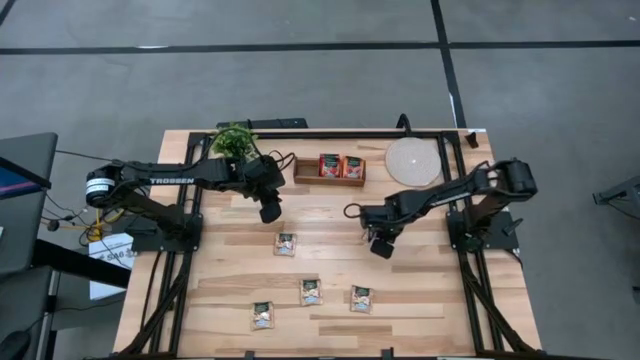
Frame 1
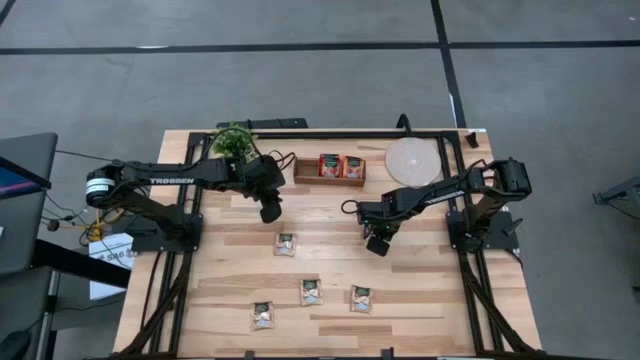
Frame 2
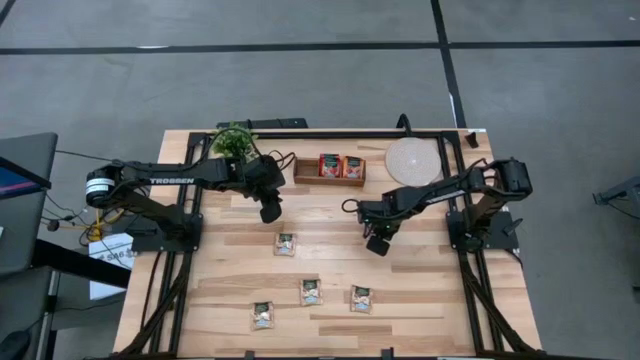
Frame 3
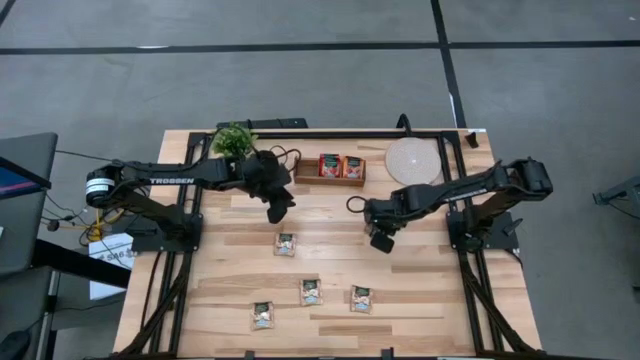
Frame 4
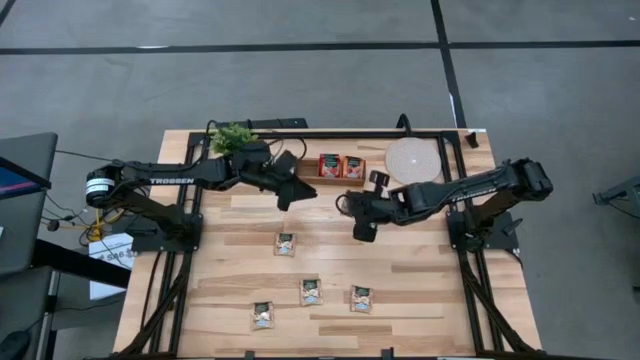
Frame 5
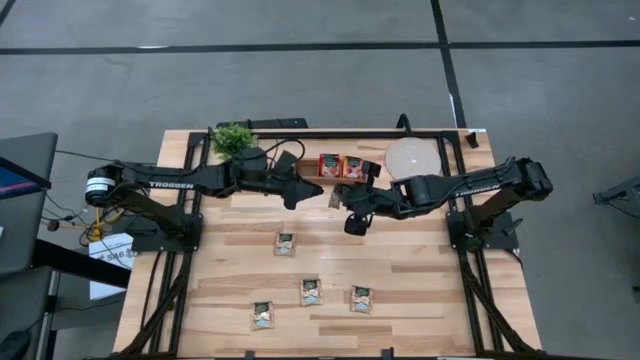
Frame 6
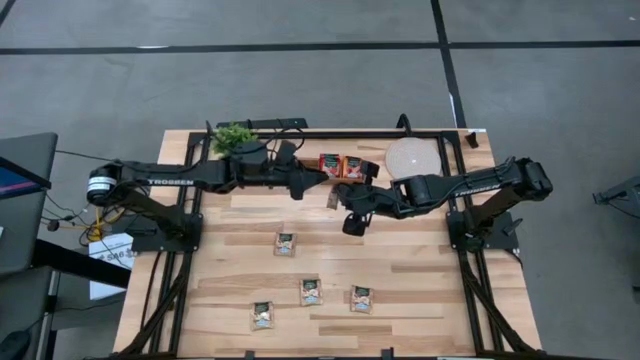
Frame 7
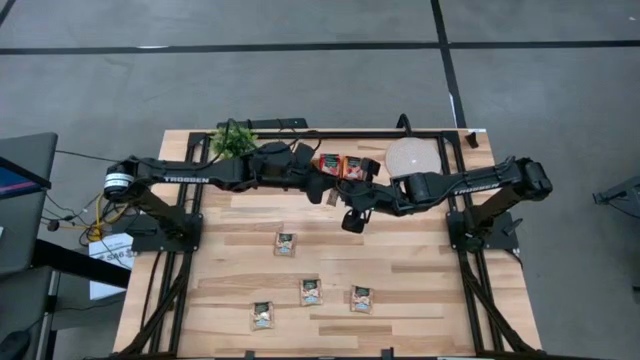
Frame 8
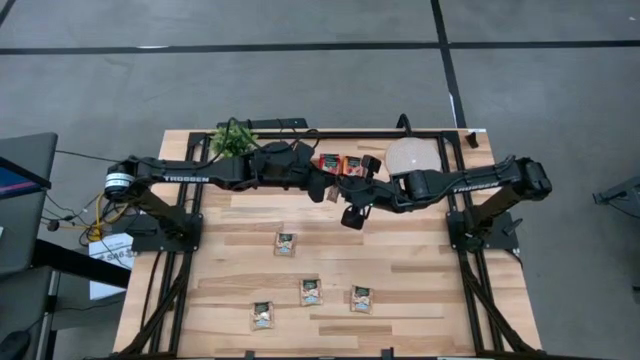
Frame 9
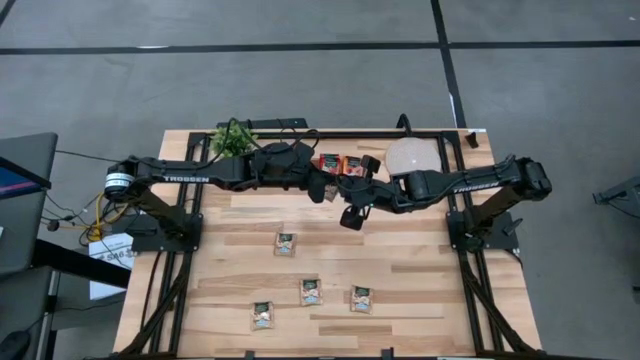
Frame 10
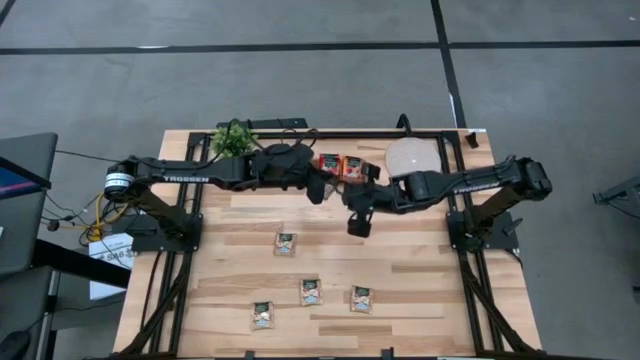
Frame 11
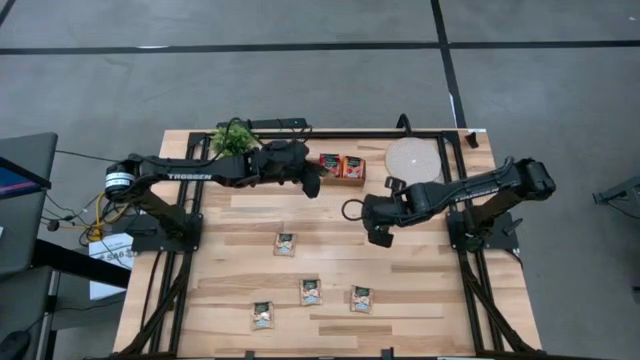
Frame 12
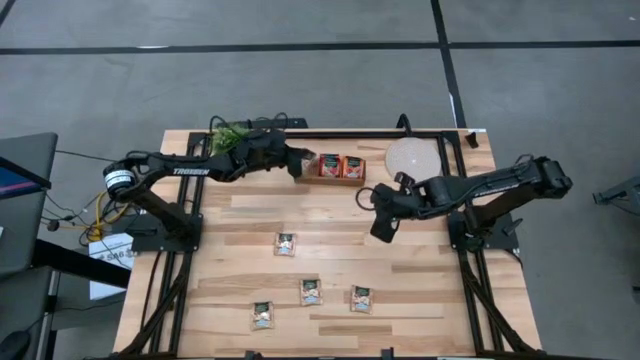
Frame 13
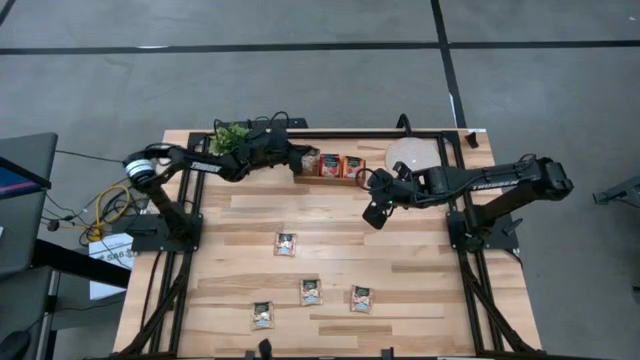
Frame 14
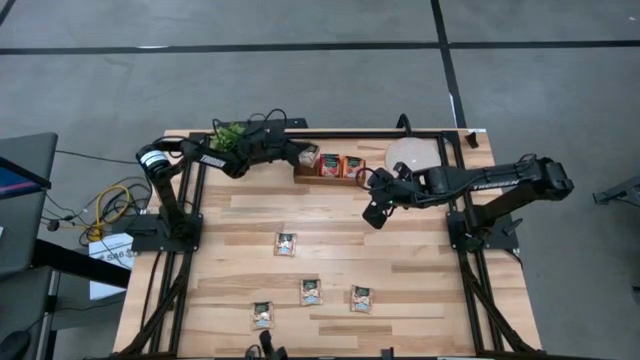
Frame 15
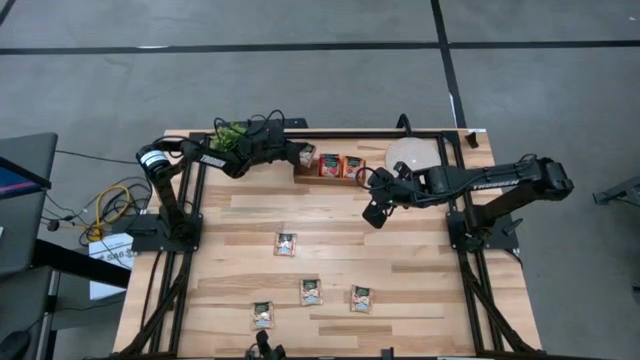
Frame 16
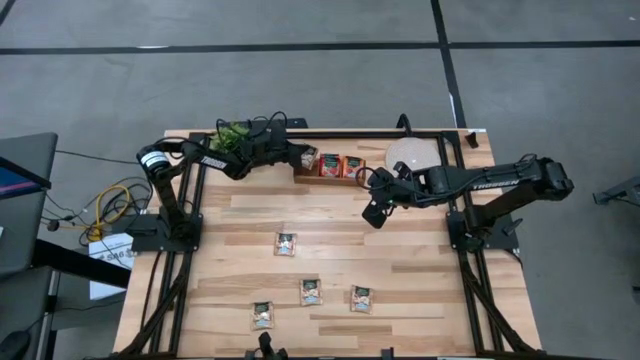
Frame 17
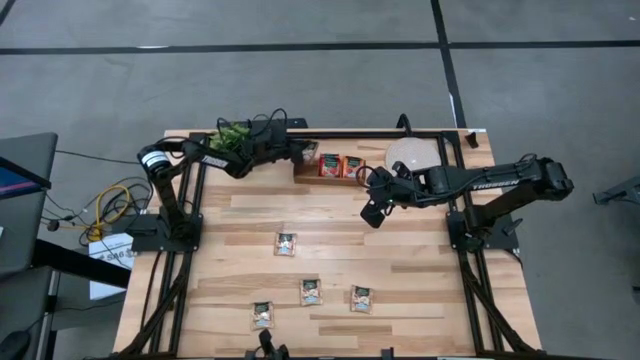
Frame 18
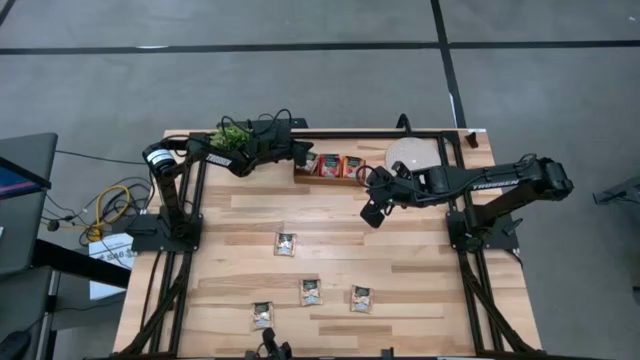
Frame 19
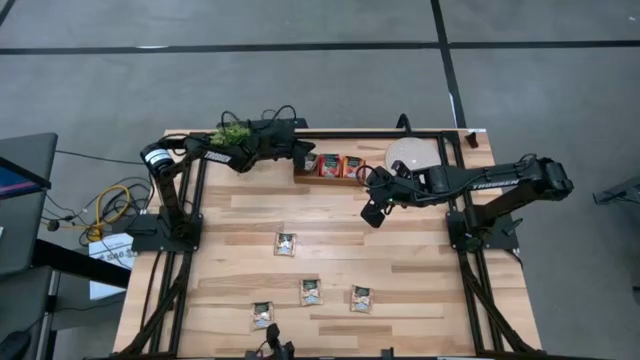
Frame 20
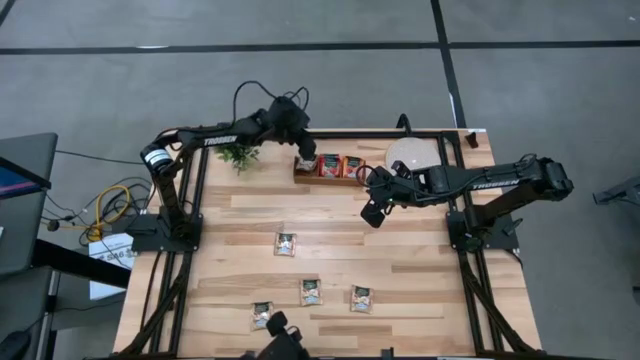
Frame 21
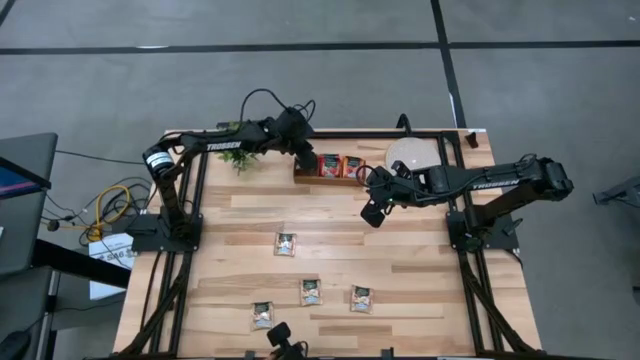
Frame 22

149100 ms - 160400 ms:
Task: Pick & Place Tea
Put the brown tea bag into the left section of the wooden organizer

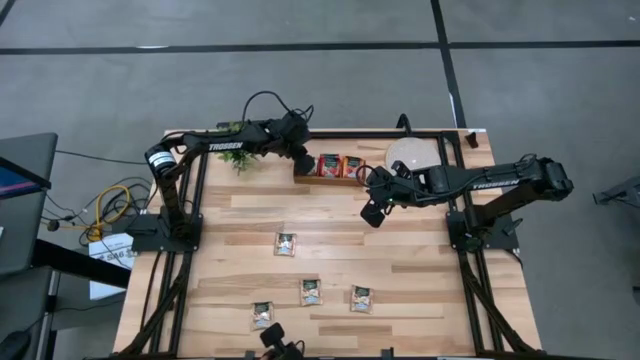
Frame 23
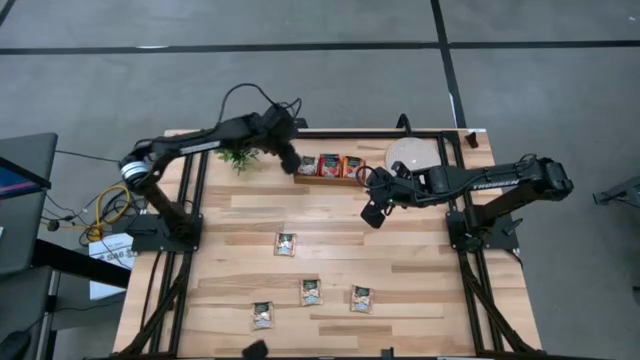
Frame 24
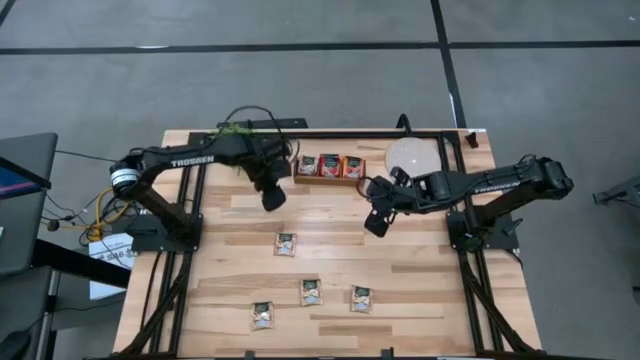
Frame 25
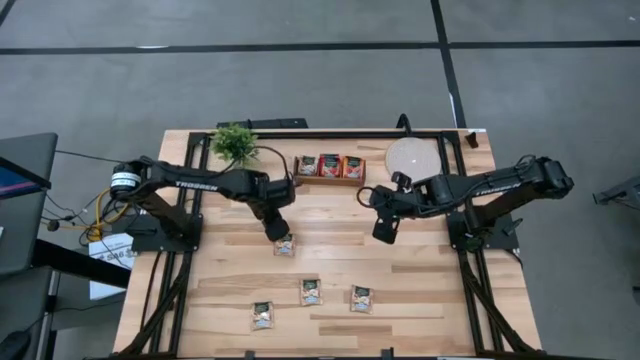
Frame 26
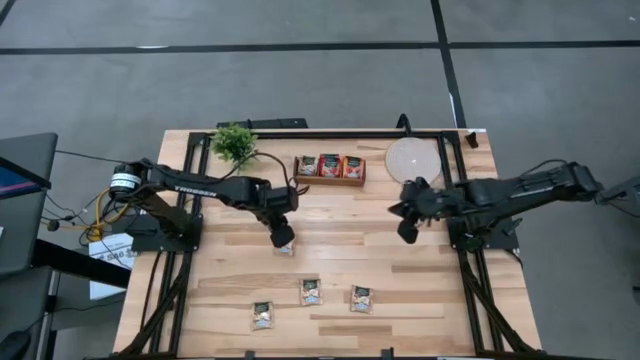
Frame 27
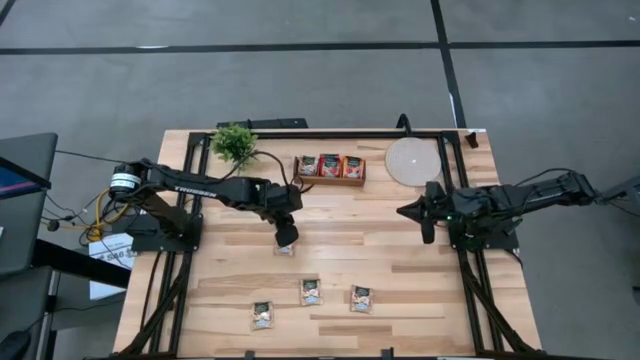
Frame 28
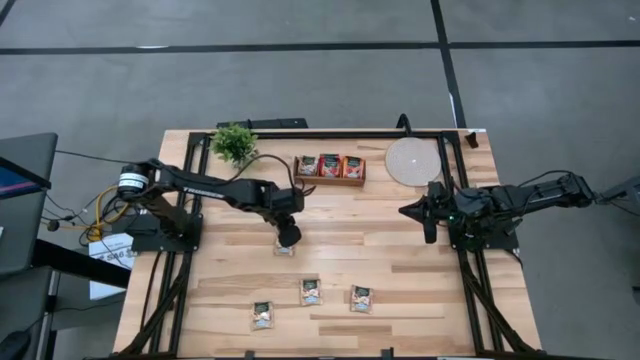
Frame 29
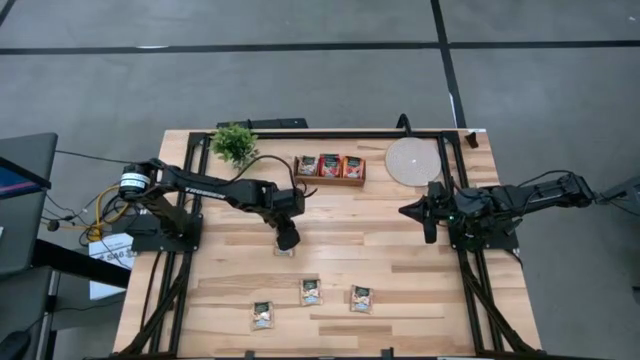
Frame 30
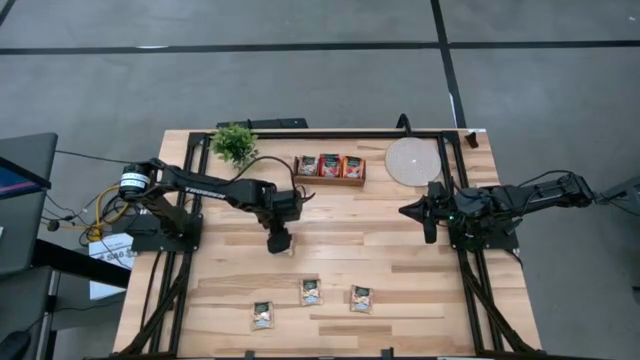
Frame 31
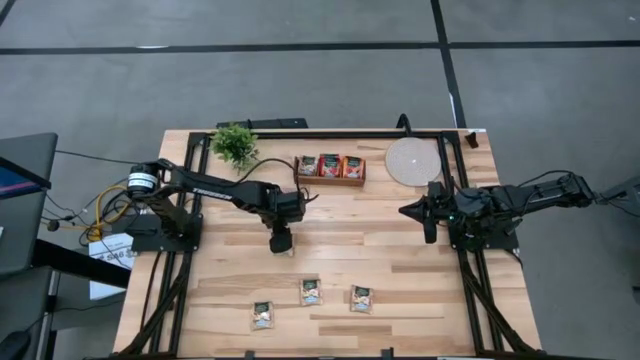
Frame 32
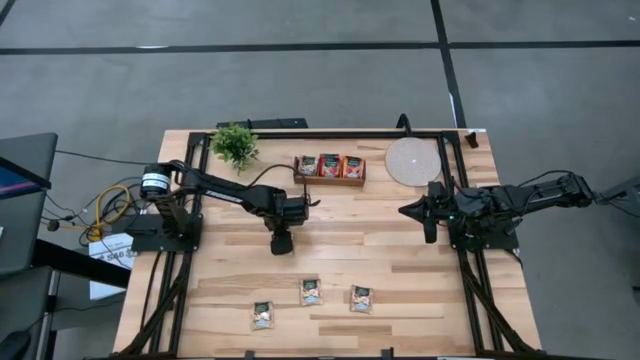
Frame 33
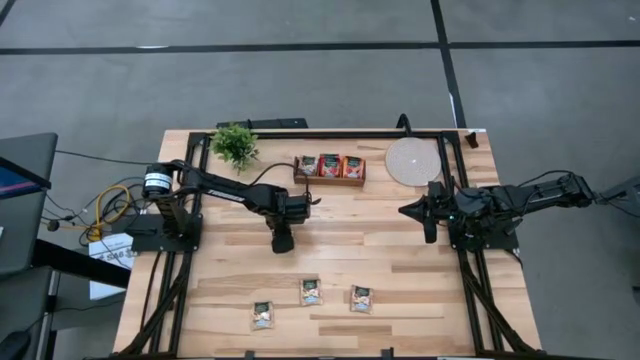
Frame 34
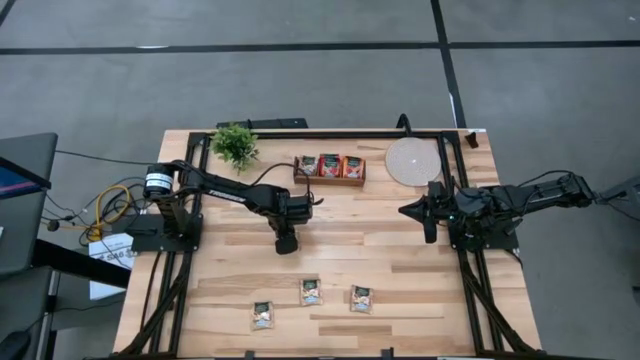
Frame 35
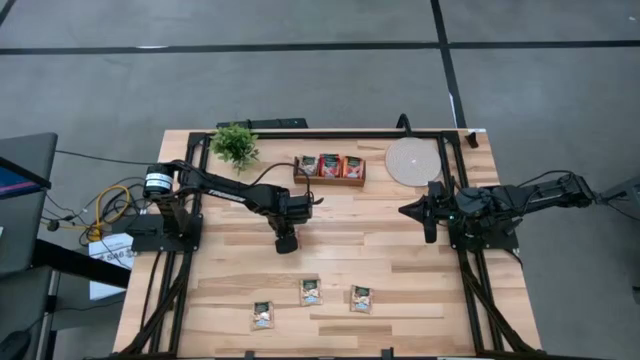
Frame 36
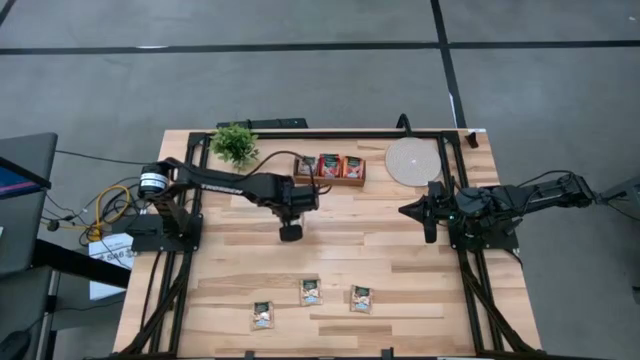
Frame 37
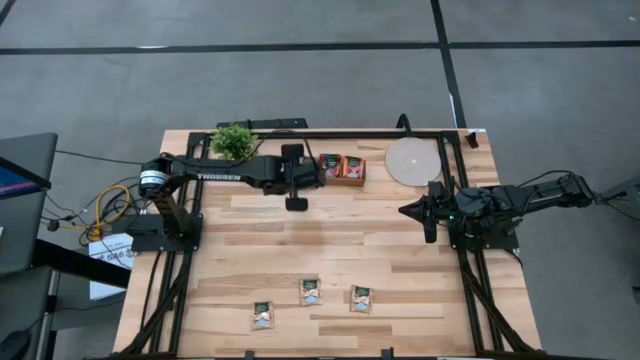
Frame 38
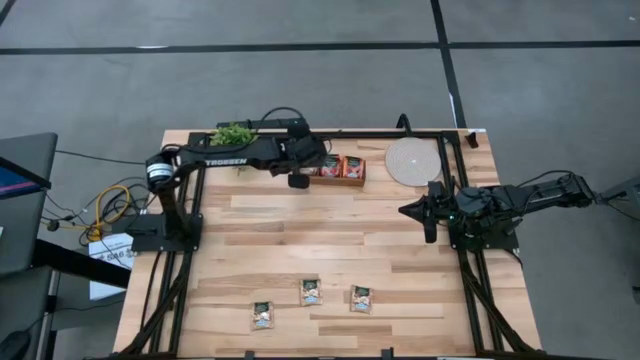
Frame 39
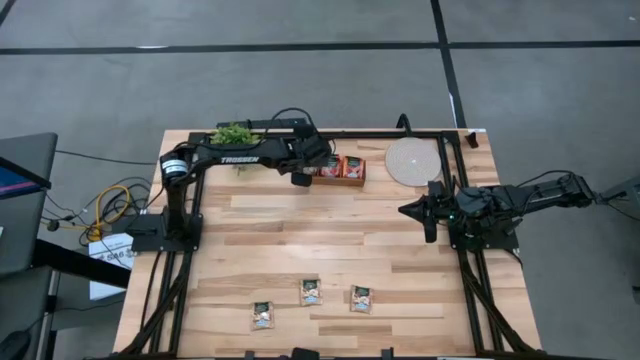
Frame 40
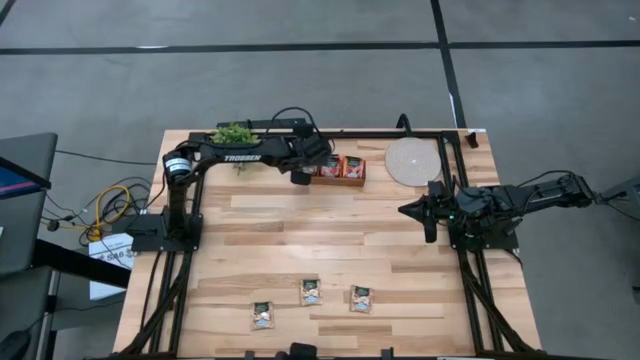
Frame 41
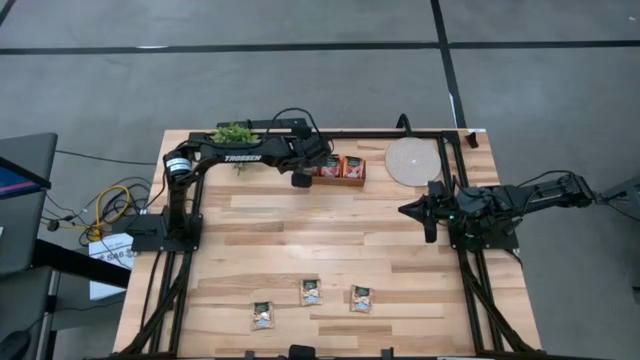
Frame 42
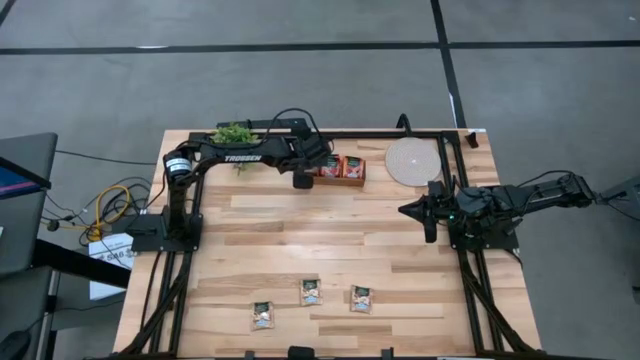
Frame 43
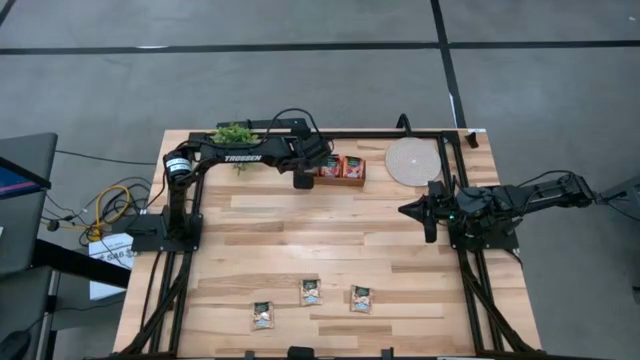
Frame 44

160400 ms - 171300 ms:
Put the brown tea bag into the left section of the wooden organizer
